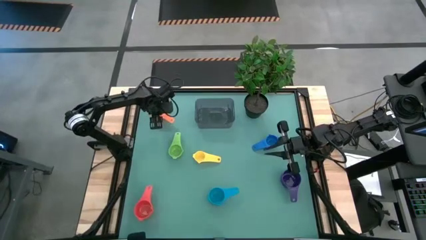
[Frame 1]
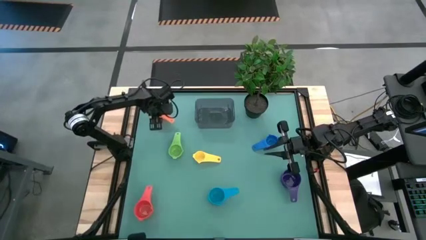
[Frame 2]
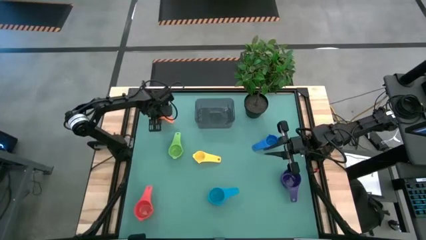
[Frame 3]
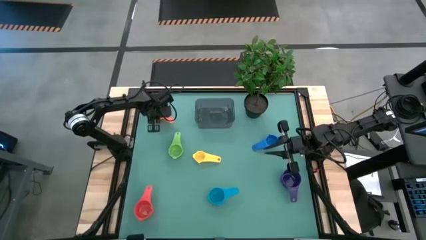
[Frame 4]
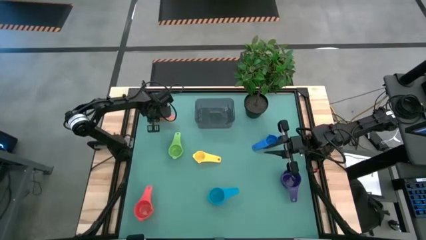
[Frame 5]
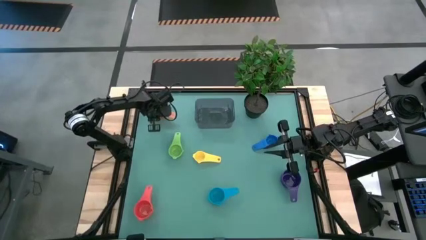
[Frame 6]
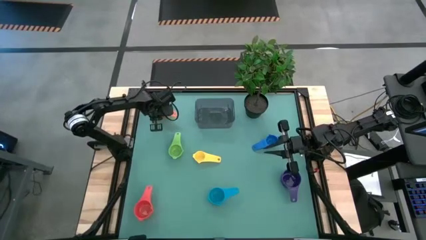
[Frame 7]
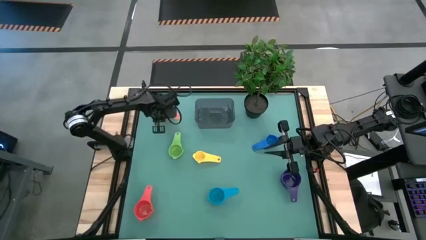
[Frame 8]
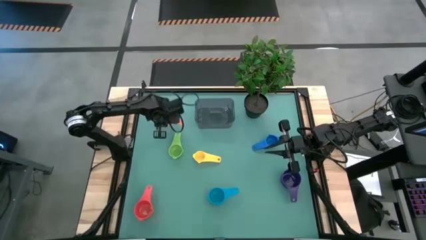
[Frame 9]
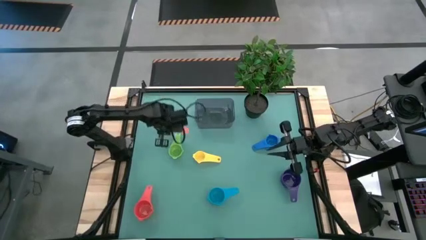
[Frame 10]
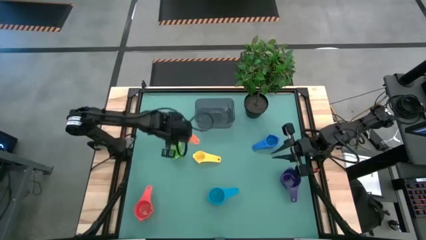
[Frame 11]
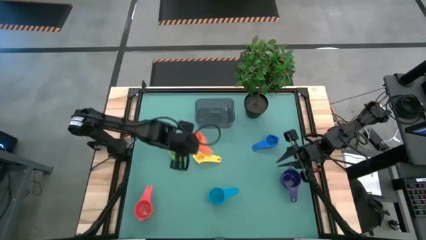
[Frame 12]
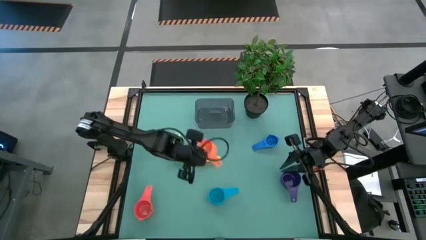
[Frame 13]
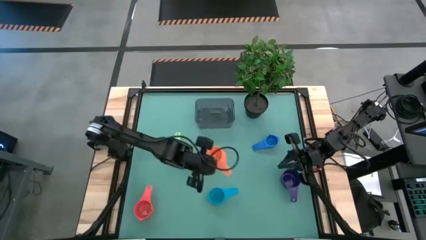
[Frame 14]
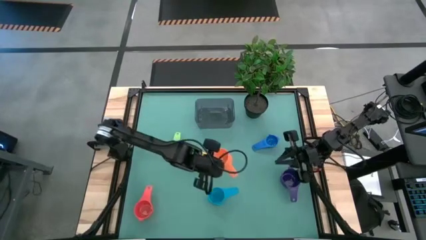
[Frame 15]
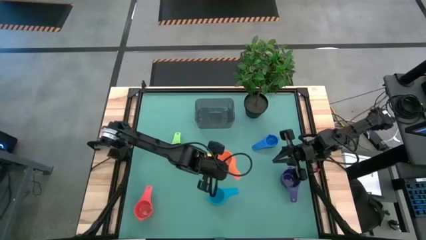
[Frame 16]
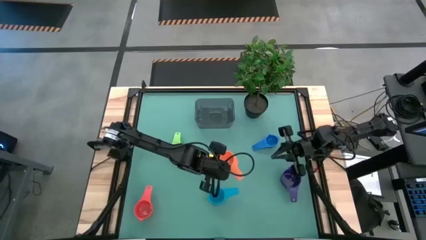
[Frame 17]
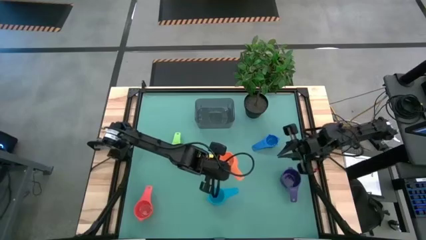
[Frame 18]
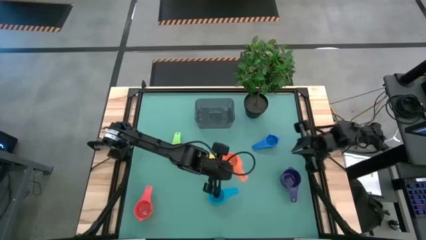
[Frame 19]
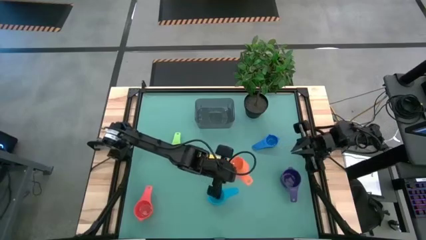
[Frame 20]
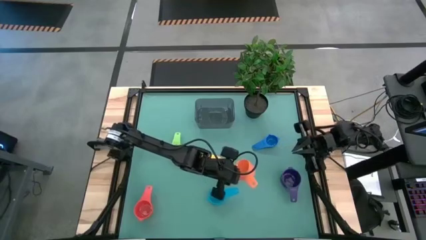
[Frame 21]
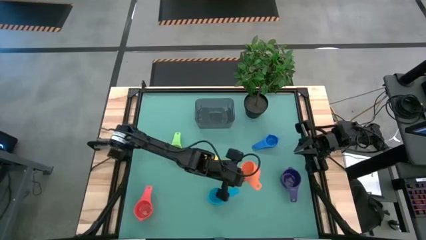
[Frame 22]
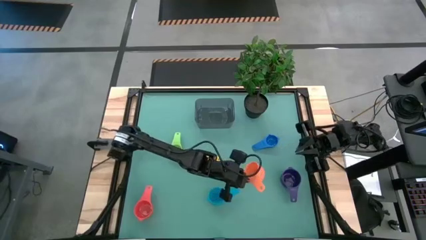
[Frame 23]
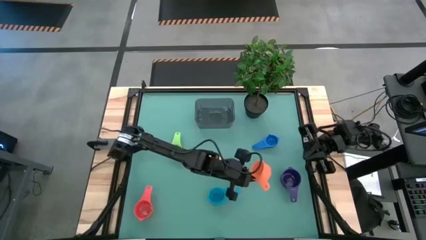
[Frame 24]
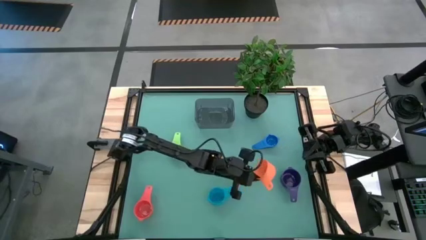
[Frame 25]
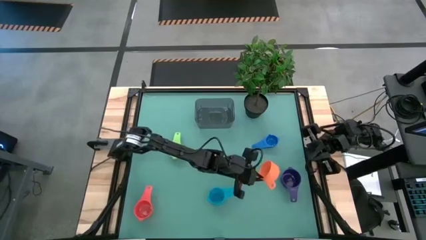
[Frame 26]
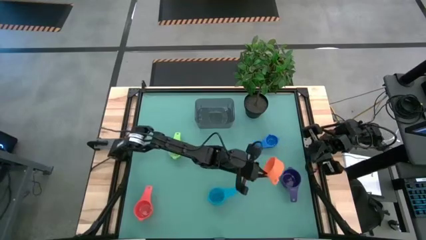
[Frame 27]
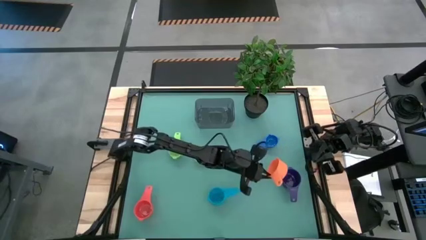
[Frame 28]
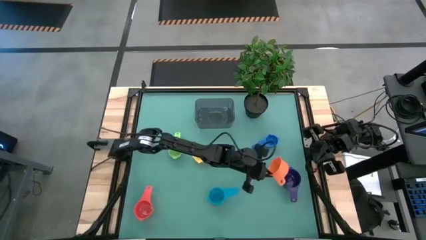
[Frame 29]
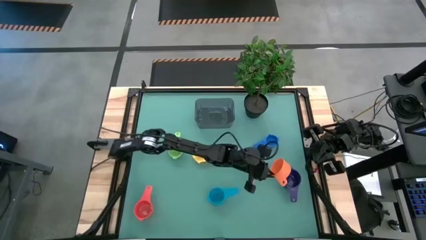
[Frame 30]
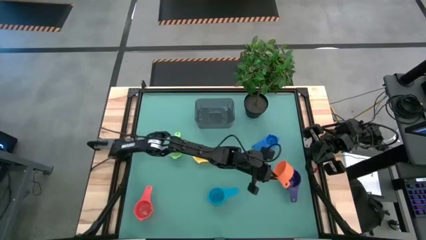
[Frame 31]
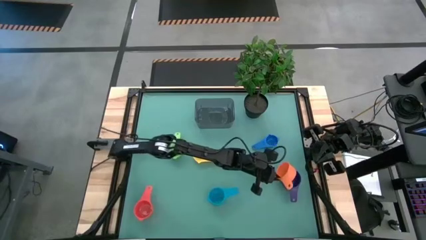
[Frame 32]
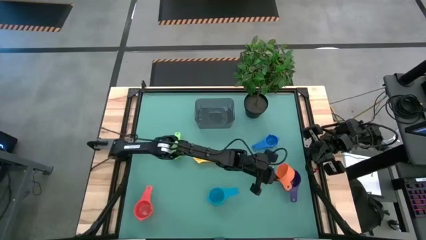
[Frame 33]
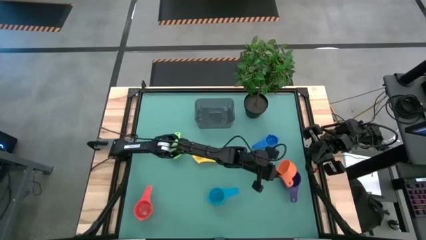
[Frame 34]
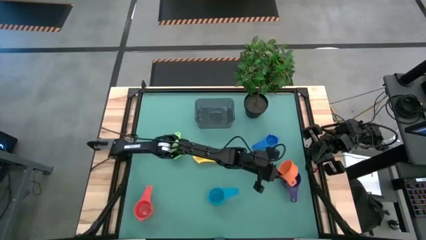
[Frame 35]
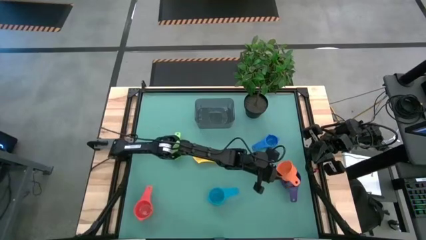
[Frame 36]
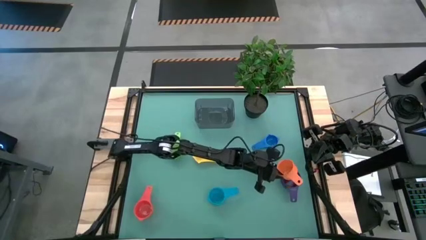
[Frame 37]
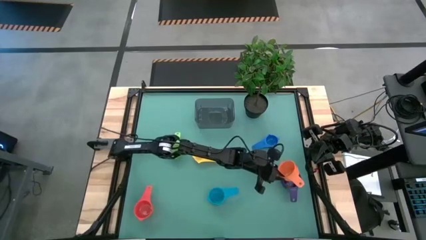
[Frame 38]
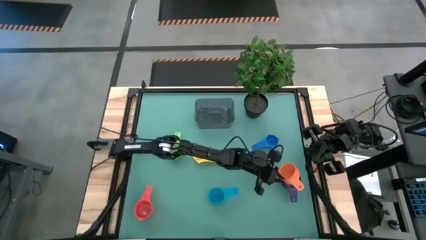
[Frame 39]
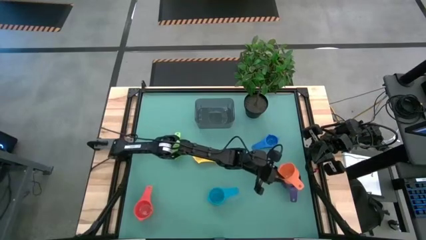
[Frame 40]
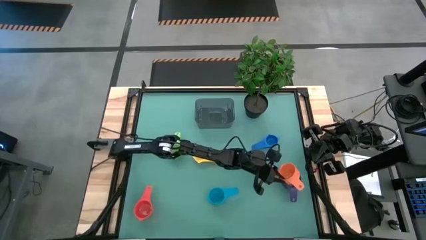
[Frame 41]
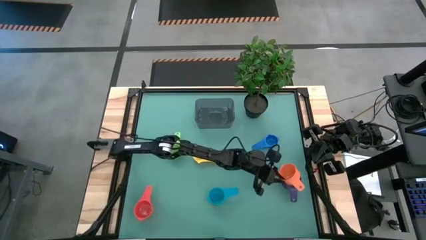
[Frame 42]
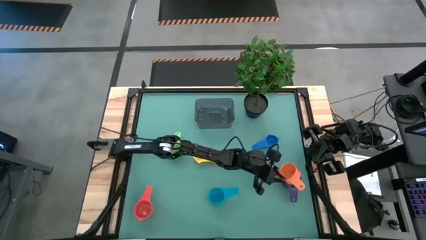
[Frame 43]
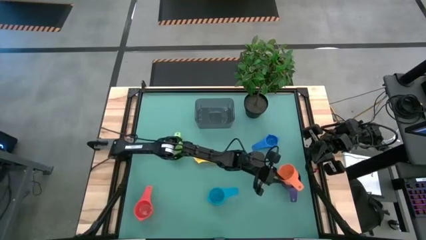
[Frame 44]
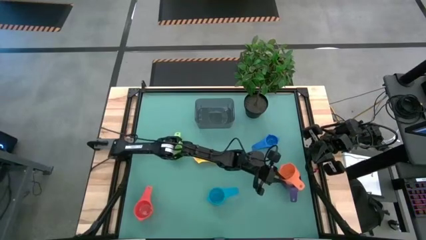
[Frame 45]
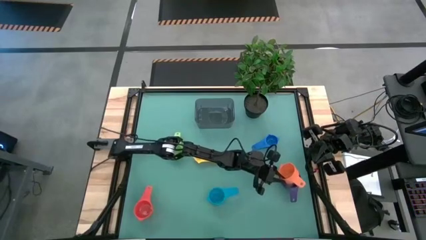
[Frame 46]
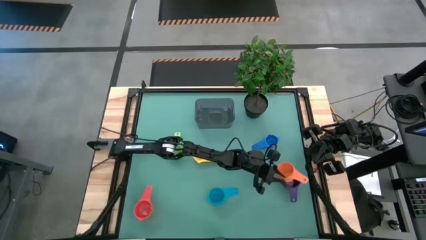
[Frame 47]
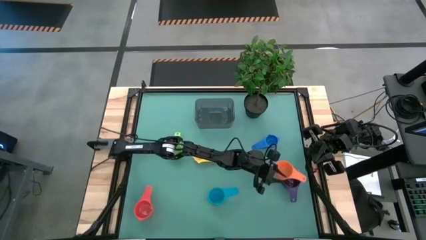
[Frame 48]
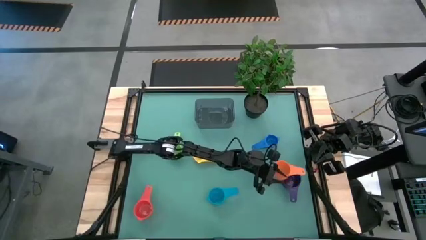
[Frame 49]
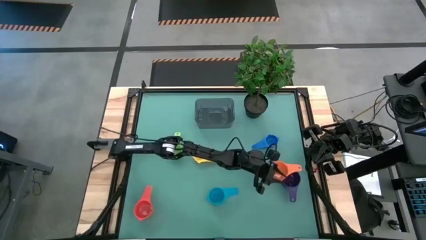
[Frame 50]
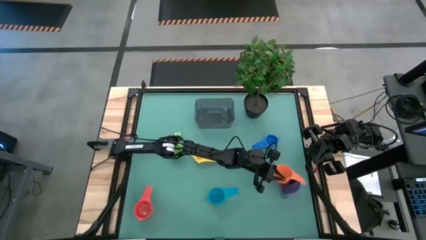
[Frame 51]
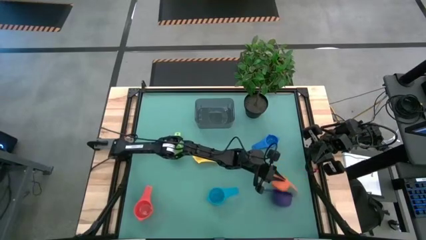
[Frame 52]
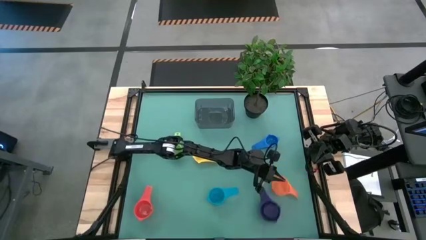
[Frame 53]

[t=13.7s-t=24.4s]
Task: Nest measuring cups in basket
Stack the orange measuring cup into the purple measuring cup

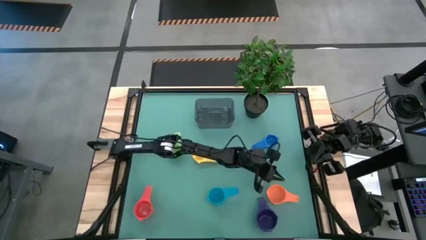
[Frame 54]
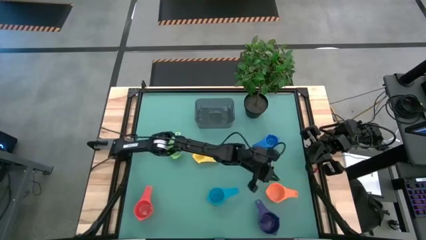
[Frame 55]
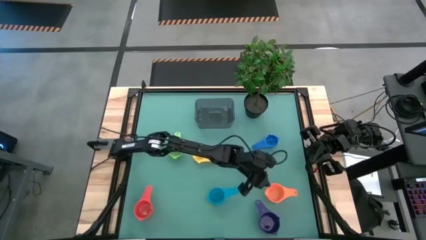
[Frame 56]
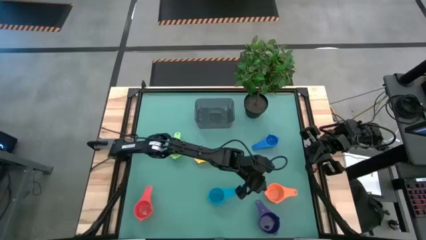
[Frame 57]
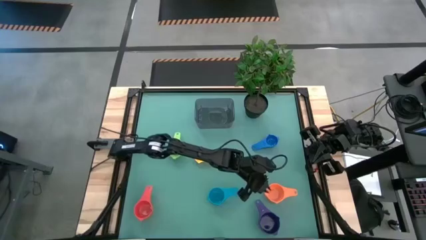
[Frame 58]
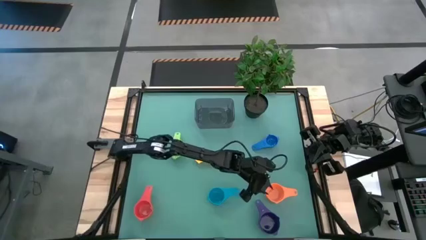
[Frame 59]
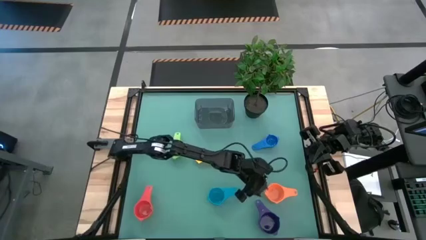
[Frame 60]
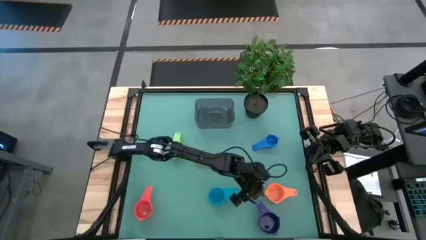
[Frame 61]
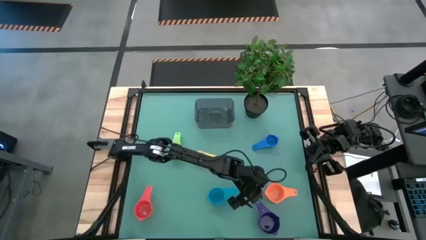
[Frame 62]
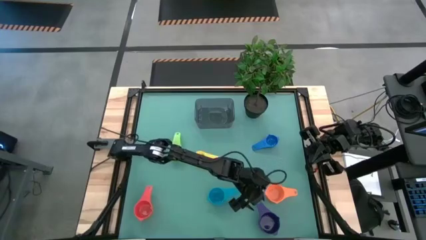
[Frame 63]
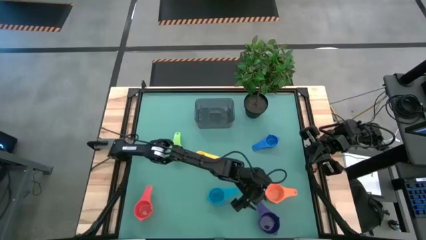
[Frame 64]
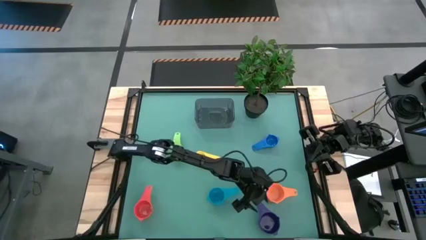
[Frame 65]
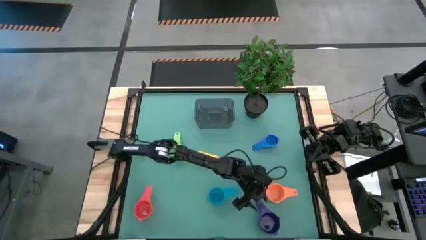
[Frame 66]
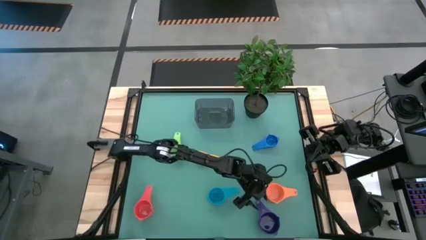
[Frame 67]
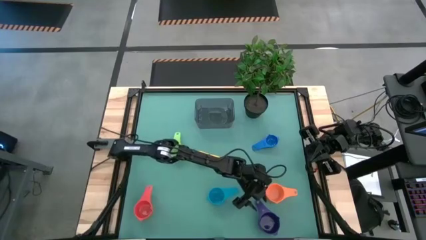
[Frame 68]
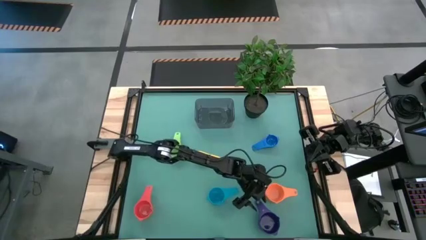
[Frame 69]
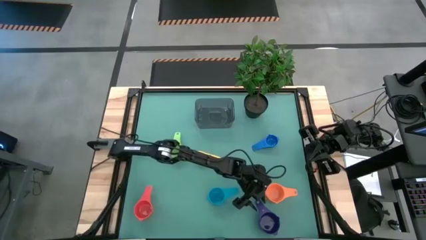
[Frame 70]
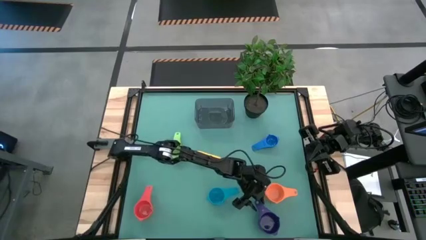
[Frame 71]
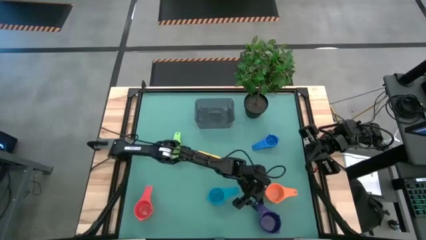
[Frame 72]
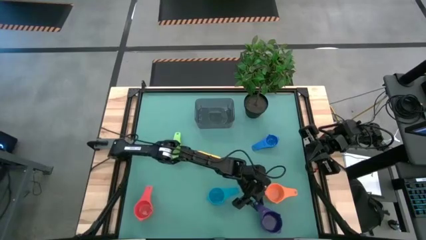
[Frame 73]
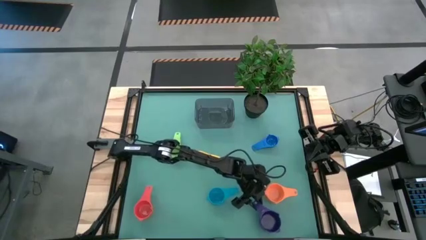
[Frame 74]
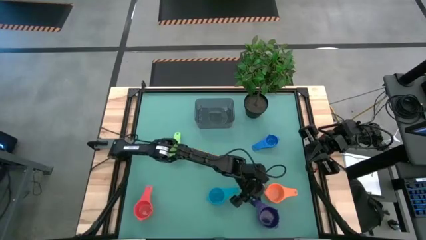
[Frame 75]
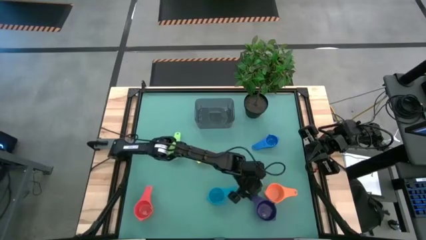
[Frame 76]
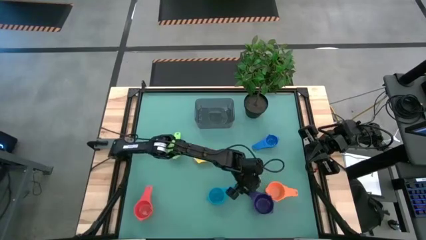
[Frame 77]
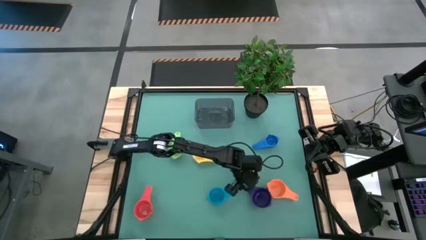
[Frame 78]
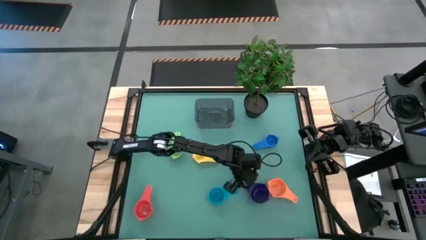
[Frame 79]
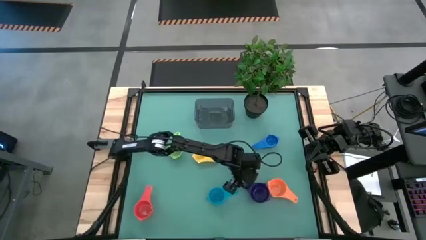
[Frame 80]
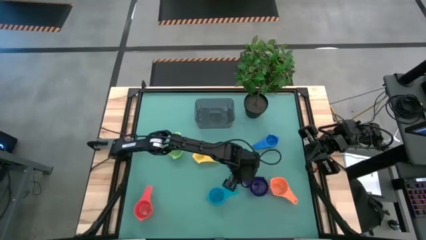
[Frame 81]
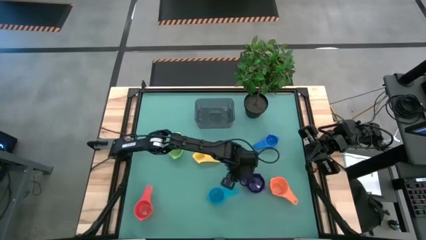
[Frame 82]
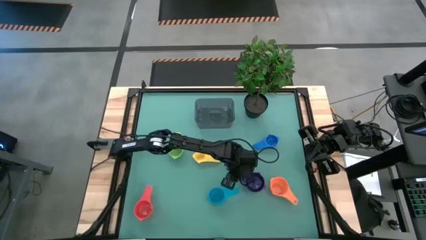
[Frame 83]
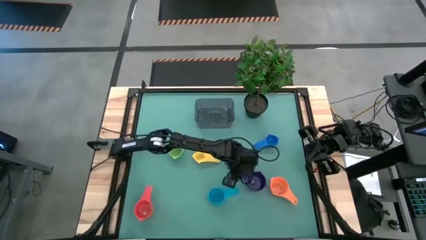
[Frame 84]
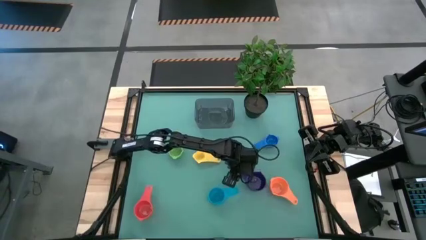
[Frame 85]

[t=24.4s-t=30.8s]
Adjust the purple measuring cup into the middle right
